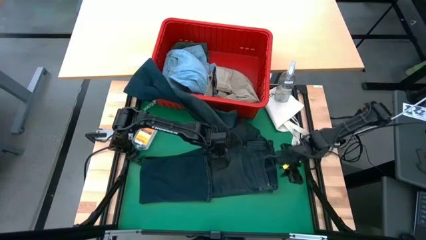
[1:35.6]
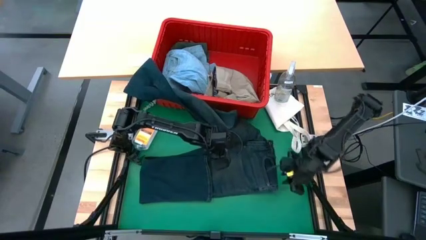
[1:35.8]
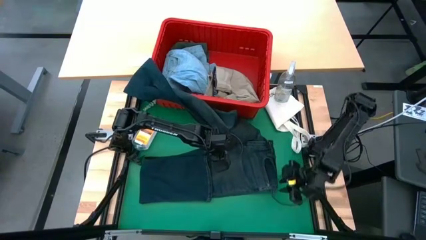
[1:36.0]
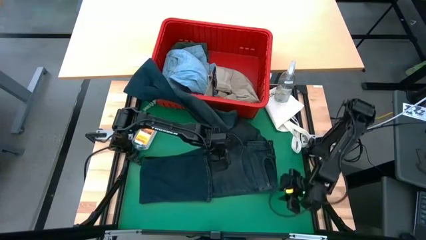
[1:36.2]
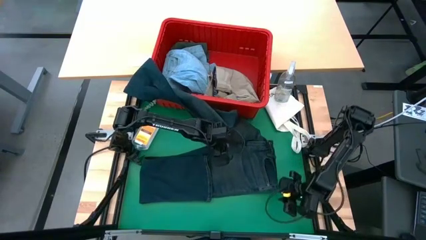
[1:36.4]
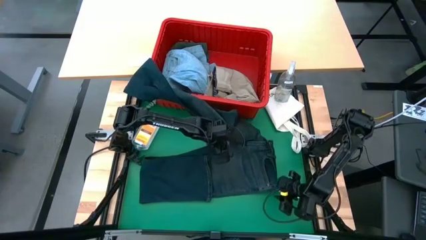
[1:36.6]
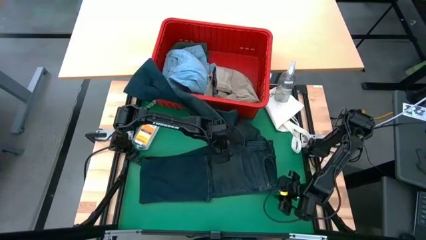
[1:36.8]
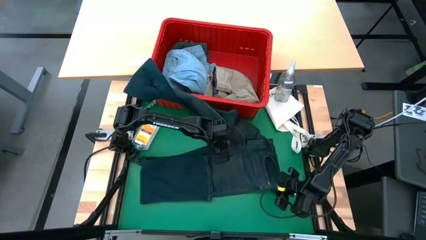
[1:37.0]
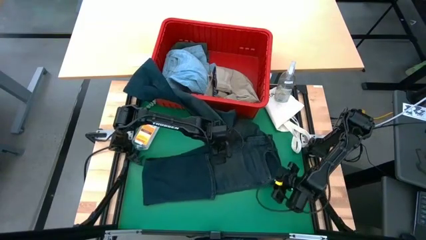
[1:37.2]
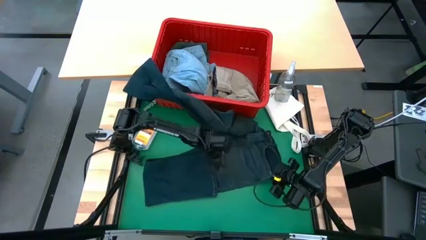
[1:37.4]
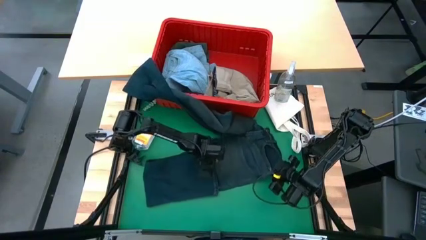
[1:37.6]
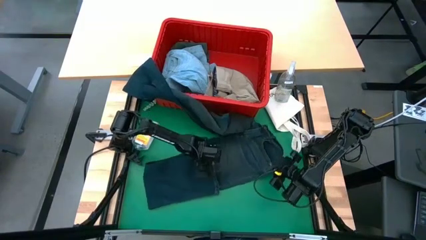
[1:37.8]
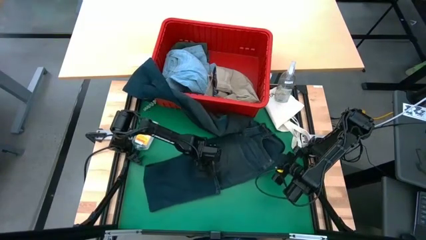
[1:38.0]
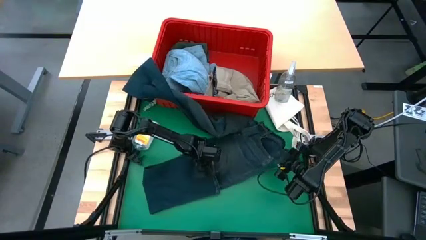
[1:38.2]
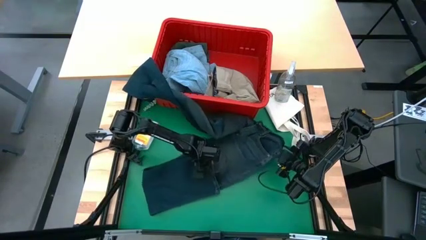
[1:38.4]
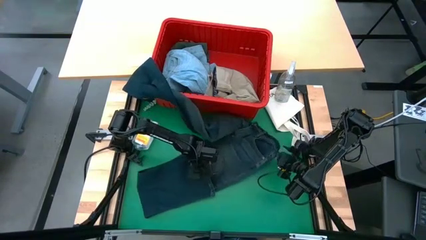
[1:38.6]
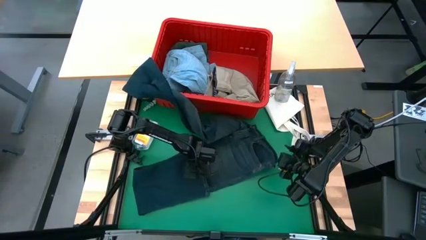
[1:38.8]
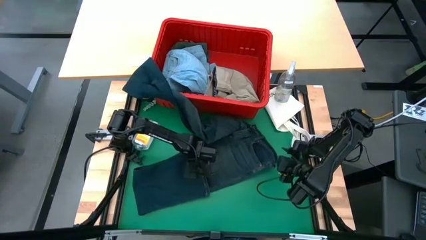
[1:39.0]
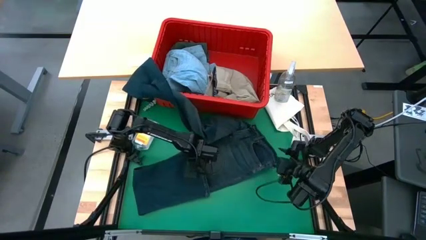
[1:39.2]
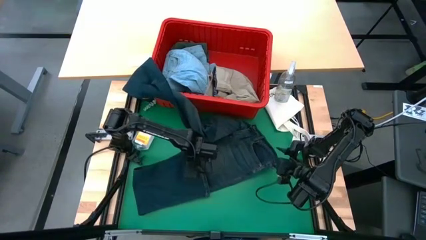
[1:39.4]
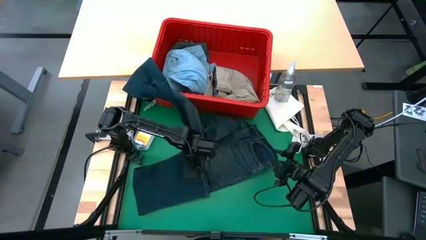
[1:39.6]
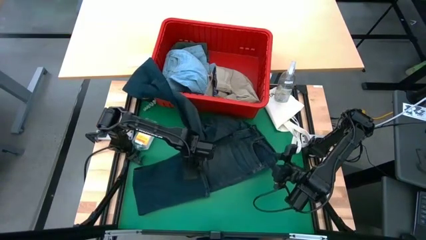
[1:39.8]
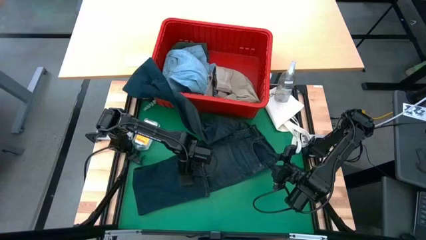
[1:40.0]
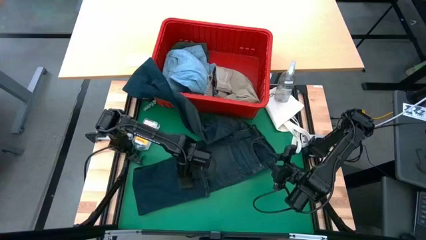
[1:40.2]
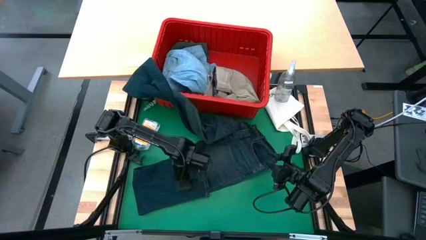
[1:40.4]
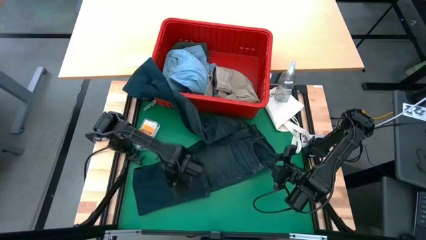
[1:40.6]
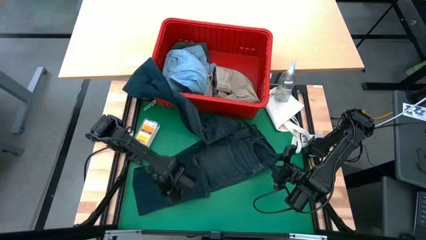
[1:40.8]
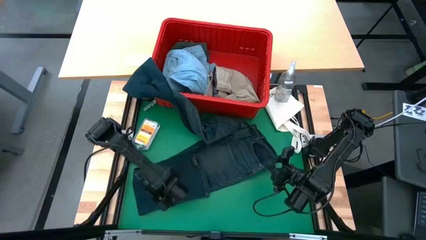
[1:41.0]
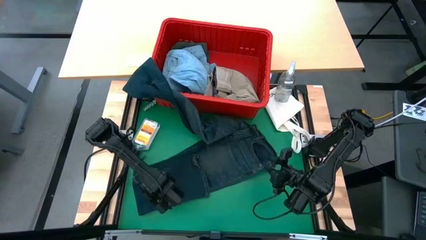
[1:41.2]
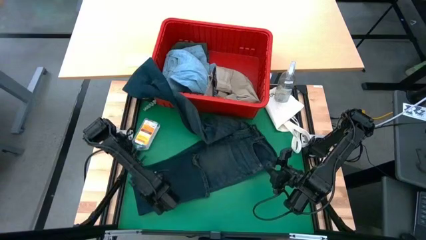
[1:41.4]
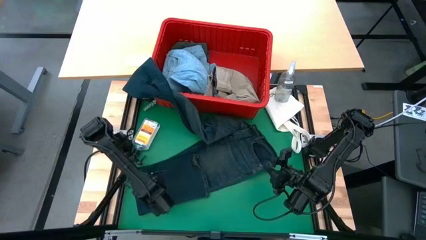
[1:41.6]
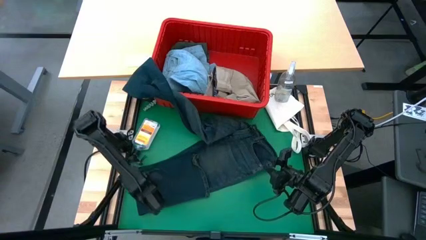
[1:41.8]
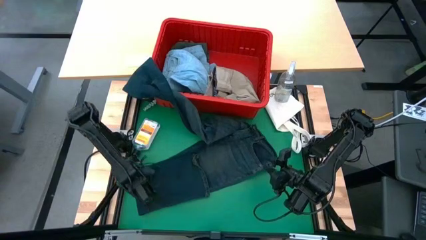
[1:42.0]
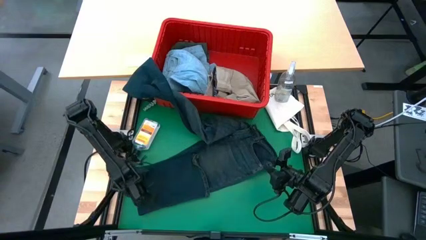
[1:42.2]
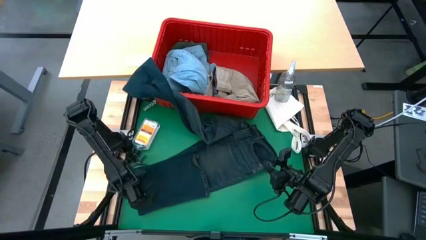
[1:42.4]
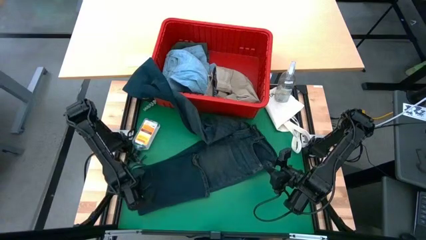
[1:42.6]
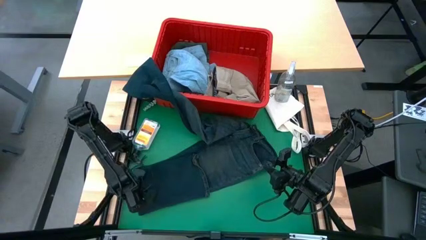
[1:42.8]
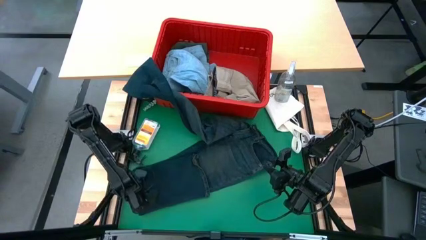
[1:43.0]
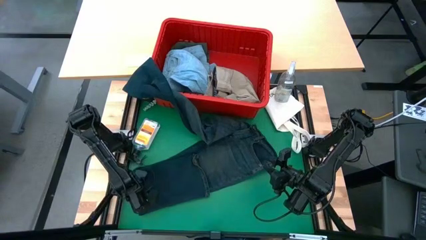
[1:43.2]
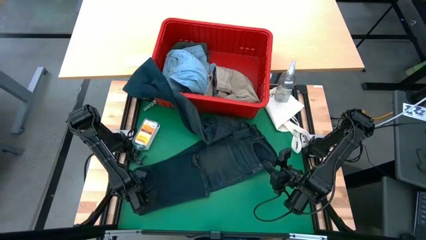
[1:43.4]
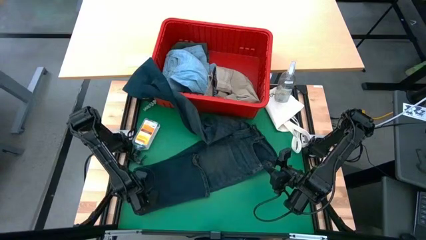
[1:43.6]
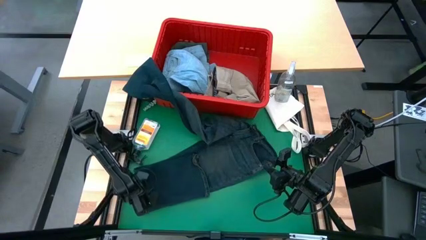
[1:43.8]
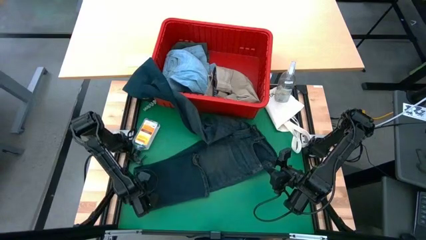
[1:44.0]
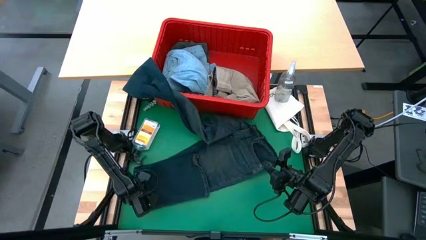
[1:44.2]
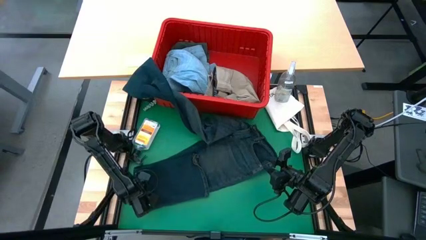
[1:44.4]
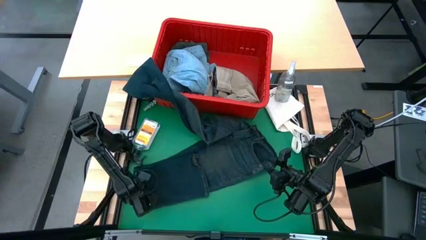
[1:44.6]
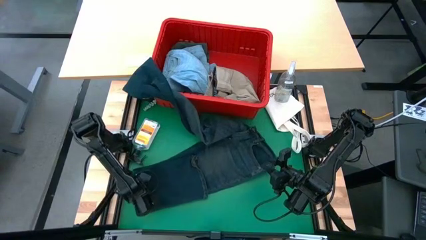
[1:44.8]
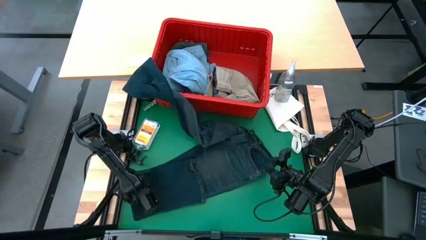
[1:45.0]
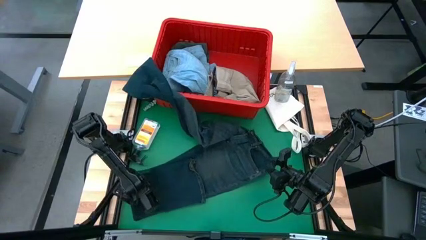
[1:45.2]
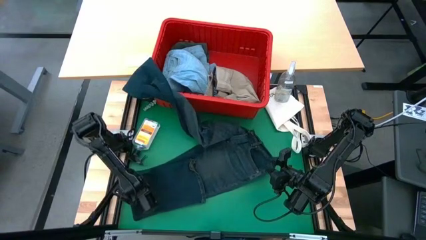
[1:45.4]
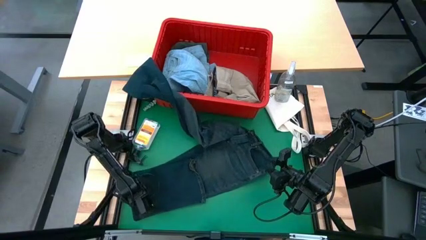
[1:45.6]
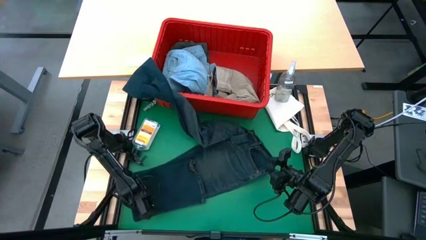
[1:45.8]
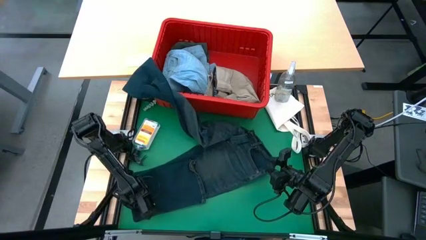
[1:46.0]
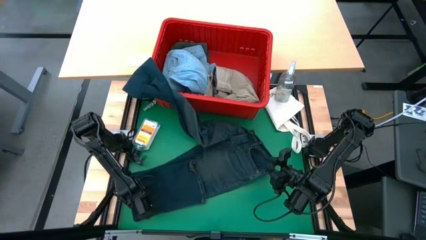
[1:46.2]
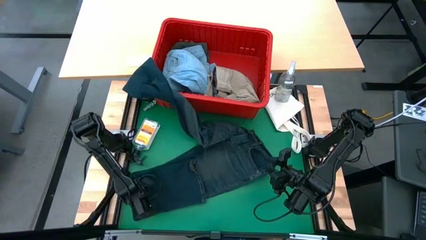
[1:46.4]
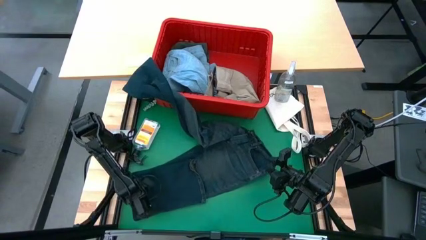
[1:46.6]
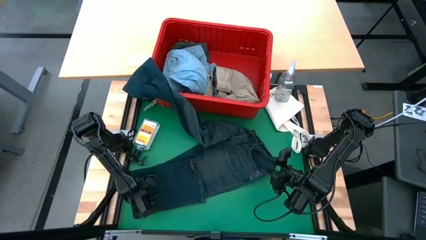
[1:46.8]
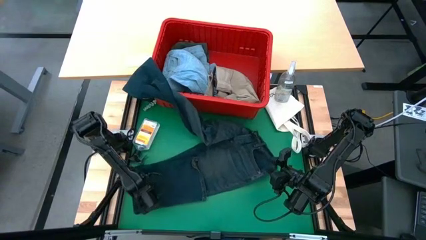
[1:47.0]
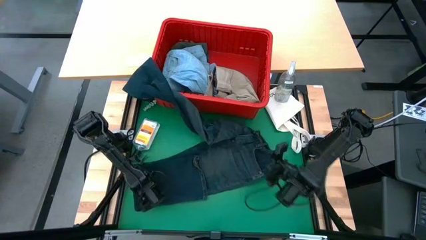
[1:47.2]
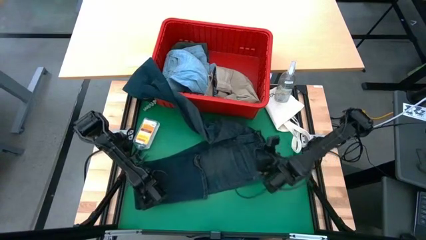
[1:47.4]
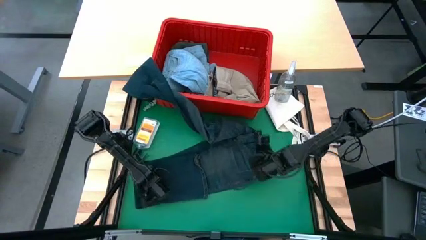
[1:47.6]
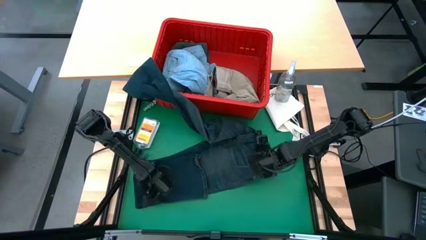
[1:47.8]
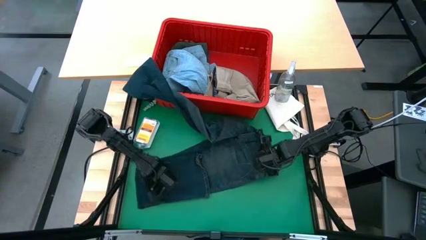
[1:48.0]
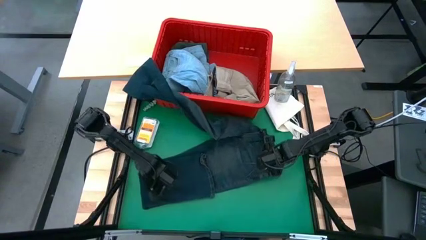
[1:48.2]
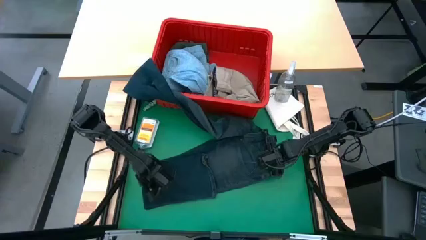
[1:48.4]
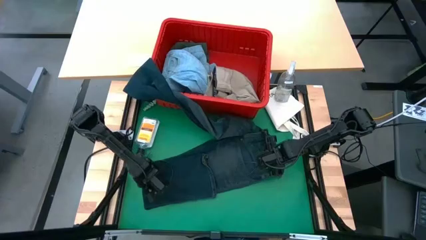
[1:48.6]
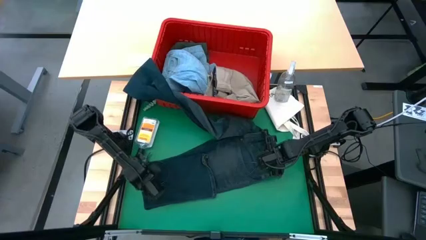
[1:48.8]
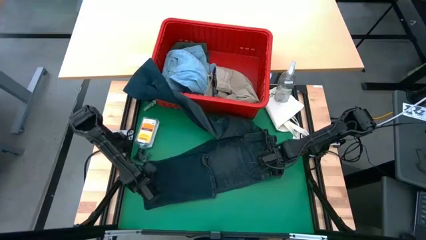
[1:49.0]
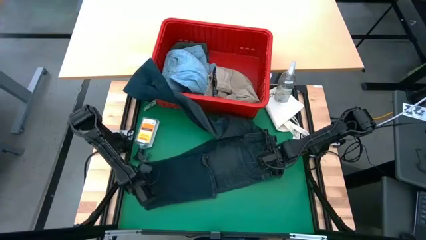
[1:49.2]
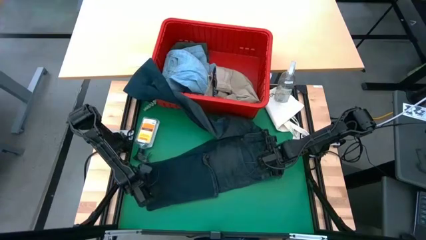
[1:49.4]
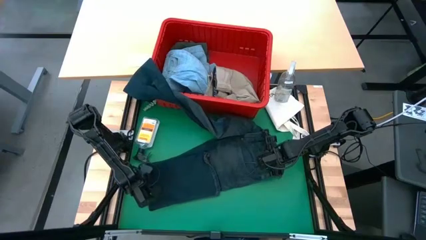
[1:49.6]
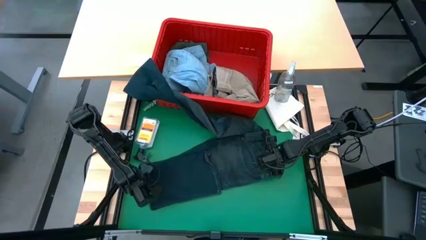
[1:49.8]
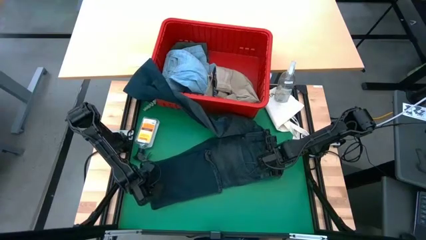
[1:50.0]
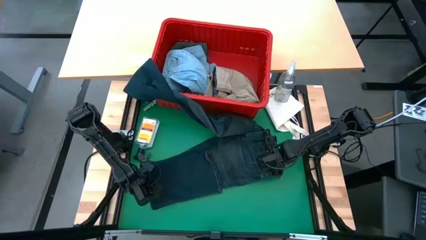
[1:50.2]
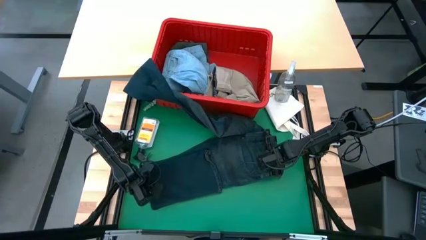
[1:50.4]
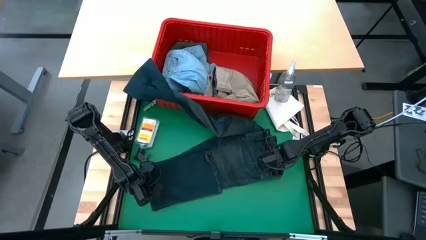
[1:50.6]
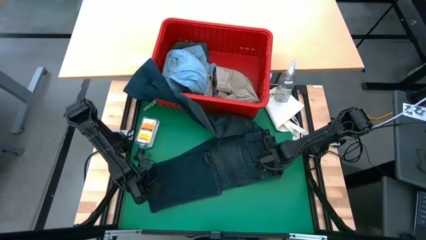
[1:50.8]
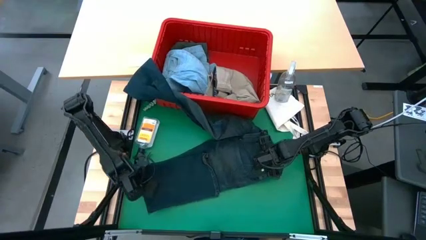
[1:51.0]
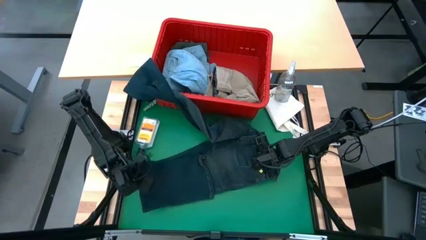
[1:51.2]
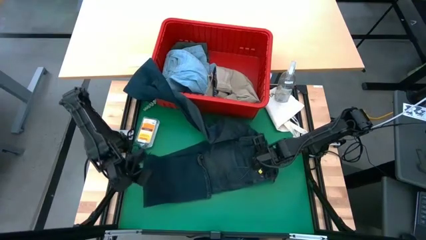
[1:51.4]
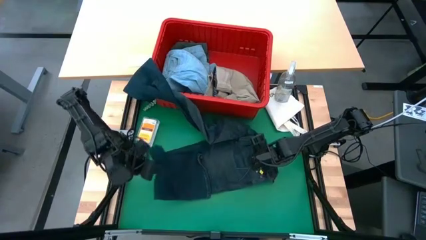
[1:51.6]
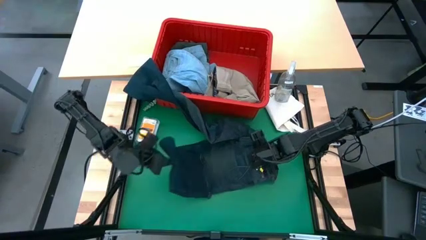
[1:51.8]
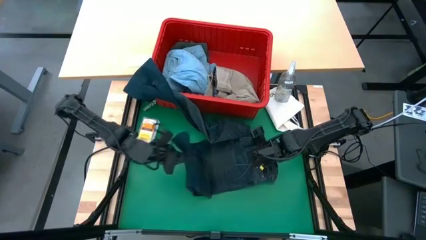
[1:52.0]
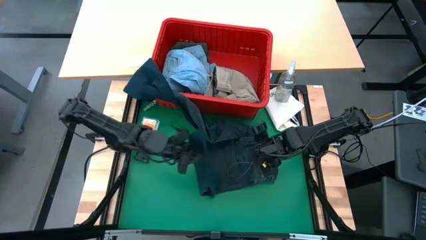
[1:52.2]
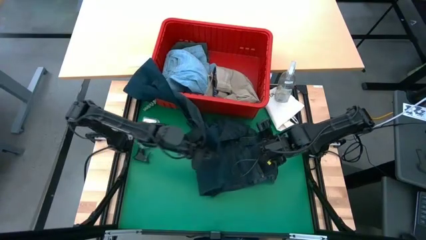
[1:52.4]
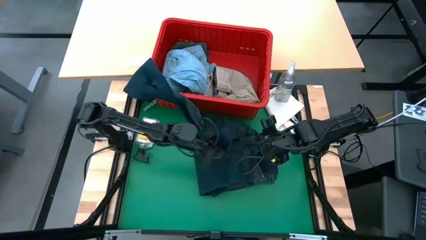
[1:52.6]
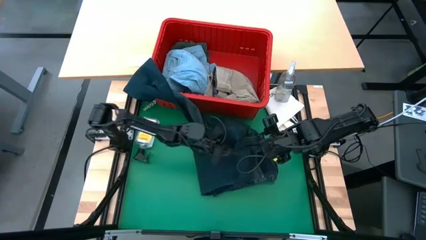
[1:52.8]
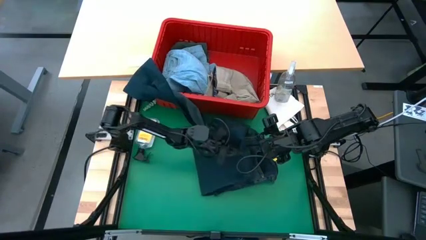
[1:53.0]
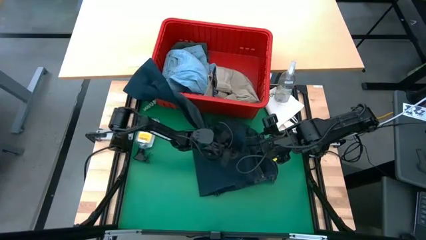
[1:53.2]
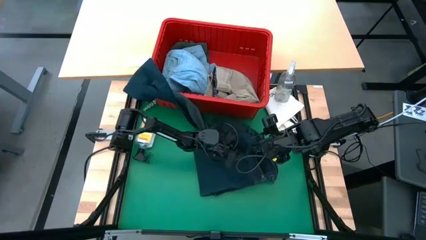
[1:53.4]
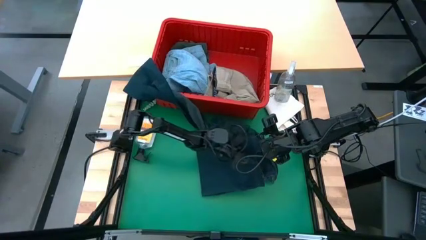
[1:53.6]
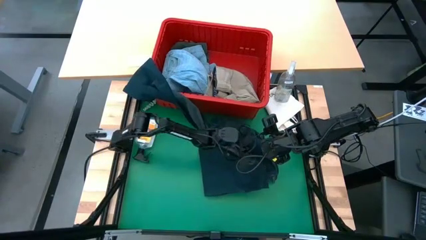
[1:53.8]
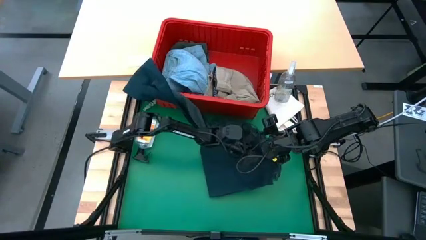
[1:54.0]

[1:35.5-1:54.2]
Task: Fold laundry
Fold the dark blue jeans
